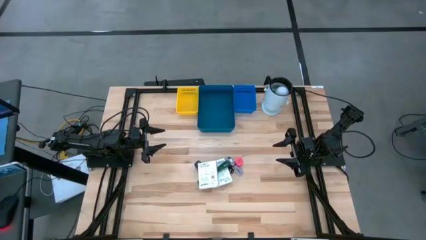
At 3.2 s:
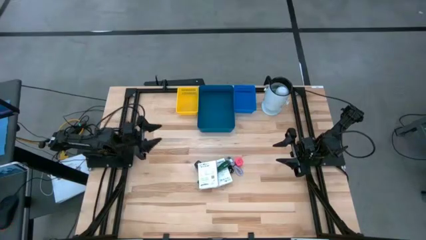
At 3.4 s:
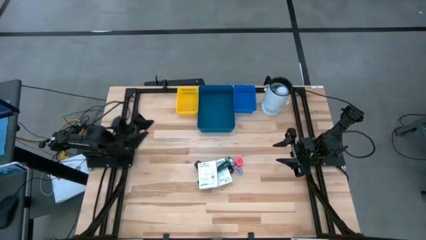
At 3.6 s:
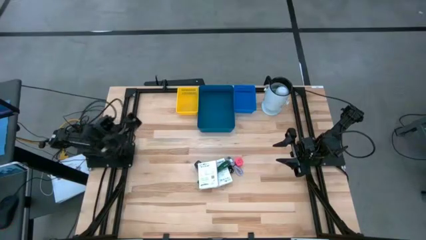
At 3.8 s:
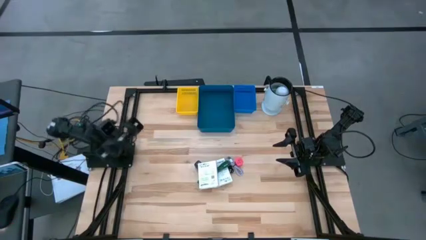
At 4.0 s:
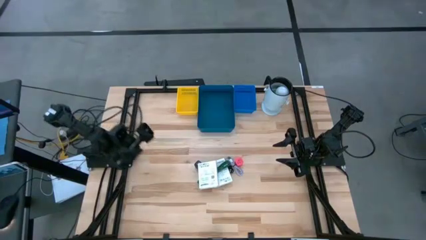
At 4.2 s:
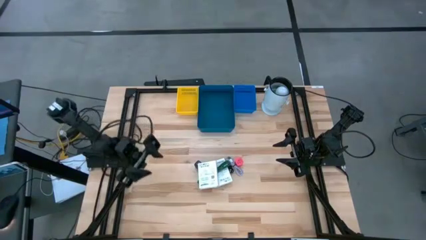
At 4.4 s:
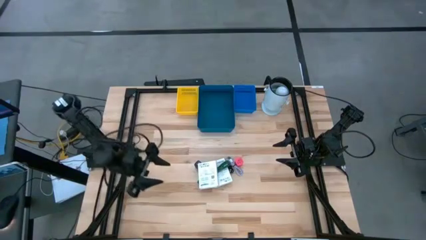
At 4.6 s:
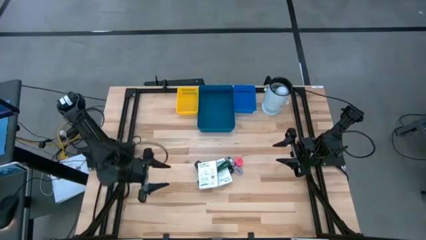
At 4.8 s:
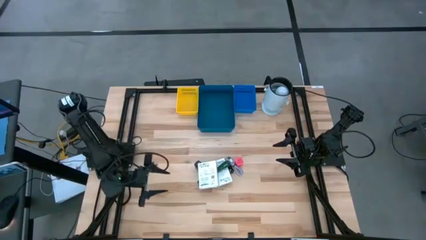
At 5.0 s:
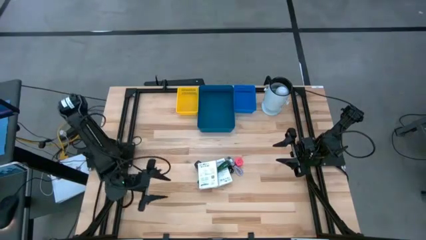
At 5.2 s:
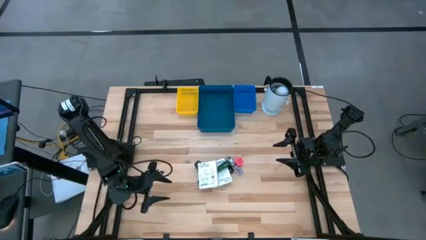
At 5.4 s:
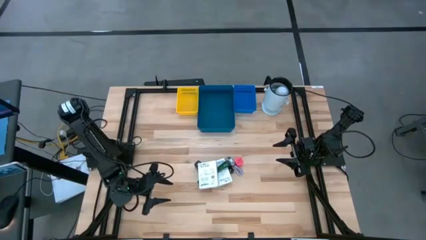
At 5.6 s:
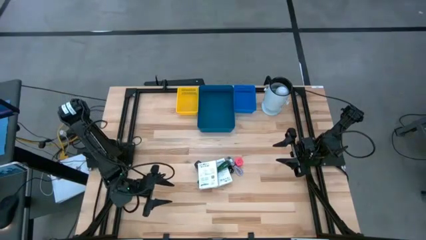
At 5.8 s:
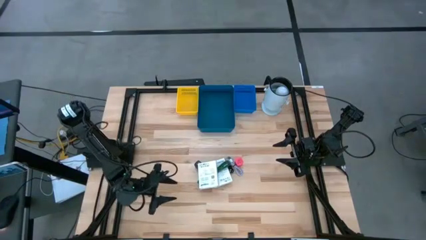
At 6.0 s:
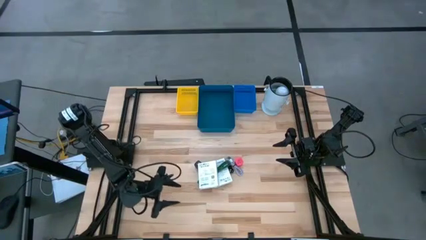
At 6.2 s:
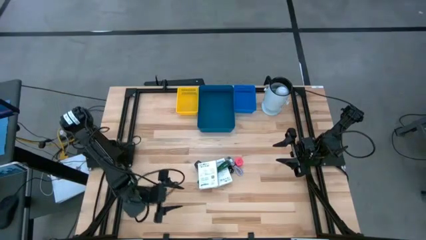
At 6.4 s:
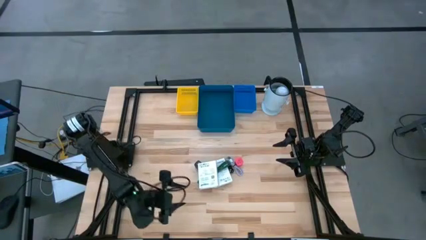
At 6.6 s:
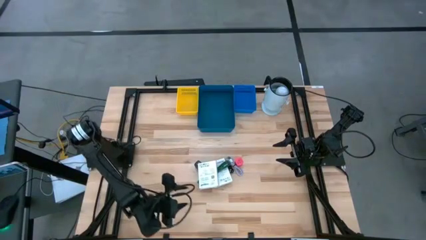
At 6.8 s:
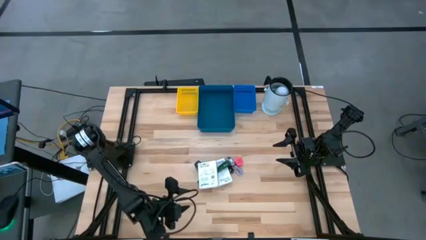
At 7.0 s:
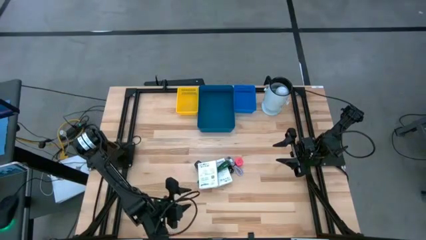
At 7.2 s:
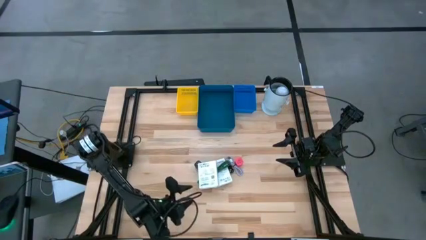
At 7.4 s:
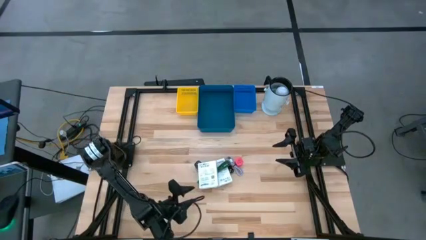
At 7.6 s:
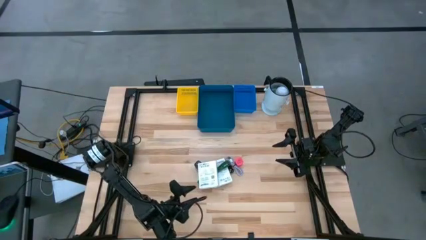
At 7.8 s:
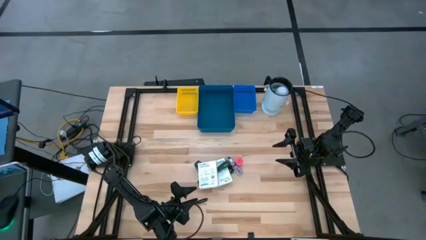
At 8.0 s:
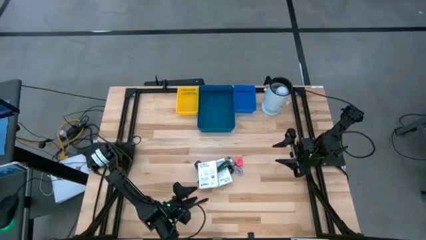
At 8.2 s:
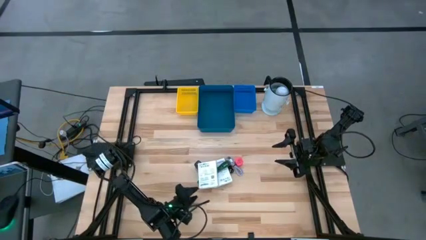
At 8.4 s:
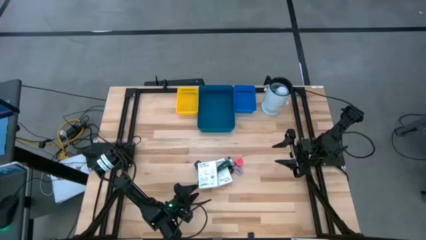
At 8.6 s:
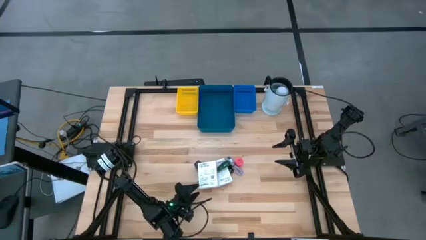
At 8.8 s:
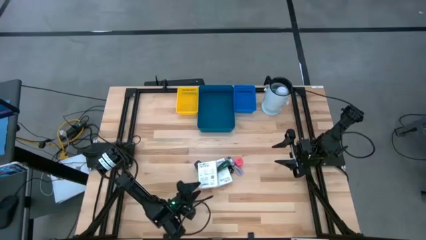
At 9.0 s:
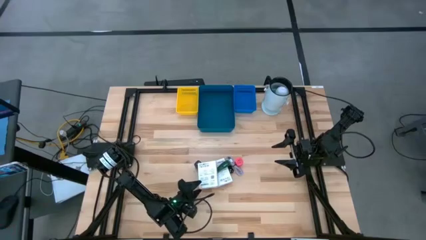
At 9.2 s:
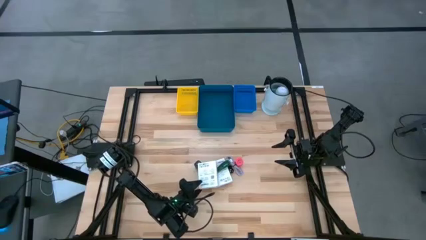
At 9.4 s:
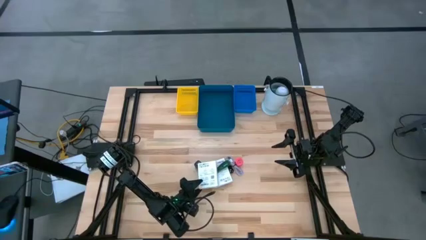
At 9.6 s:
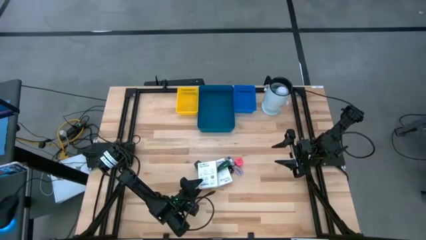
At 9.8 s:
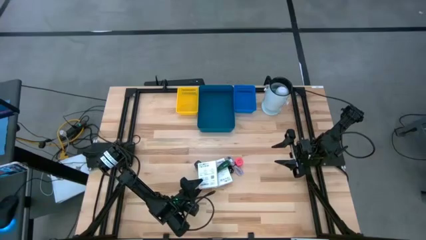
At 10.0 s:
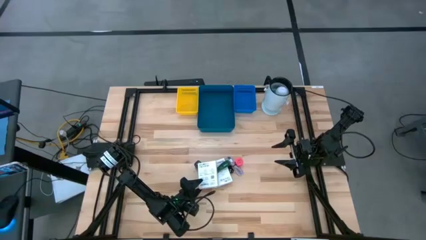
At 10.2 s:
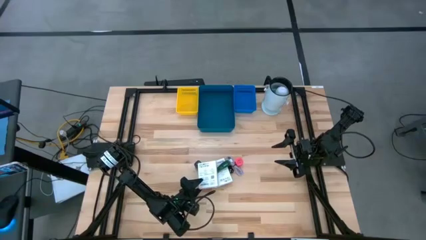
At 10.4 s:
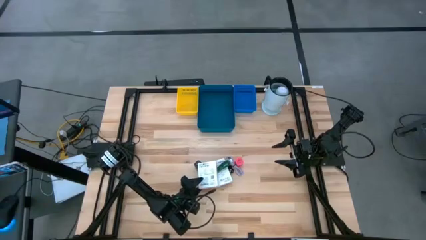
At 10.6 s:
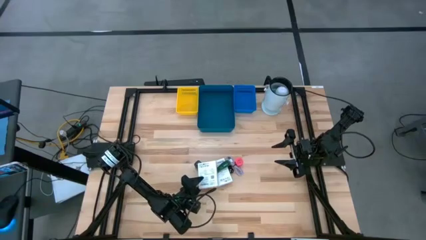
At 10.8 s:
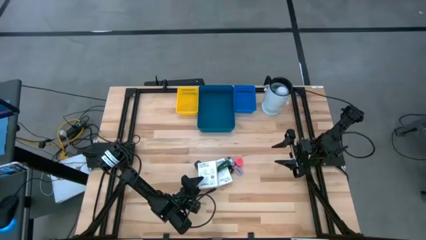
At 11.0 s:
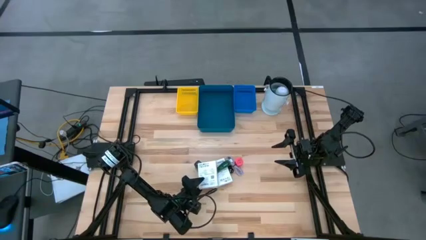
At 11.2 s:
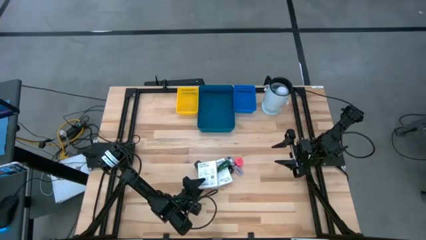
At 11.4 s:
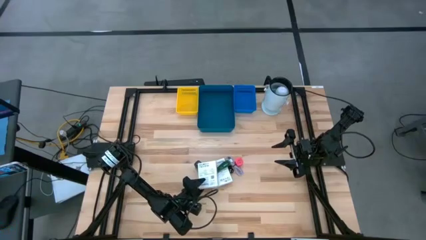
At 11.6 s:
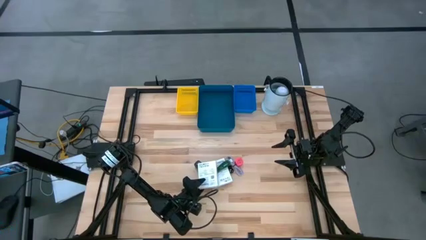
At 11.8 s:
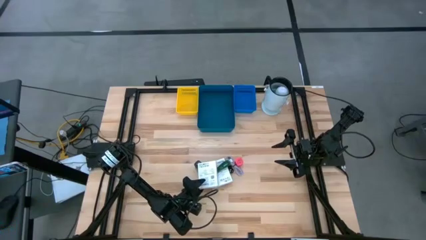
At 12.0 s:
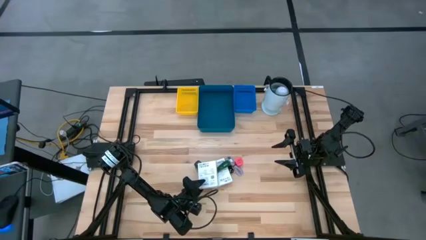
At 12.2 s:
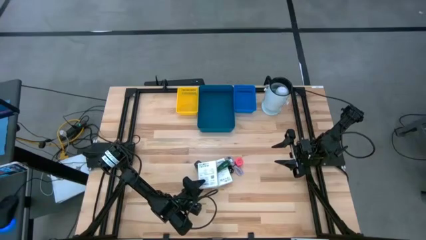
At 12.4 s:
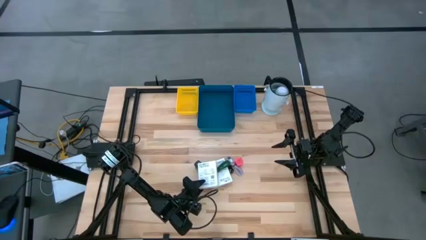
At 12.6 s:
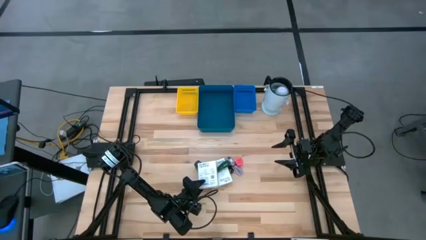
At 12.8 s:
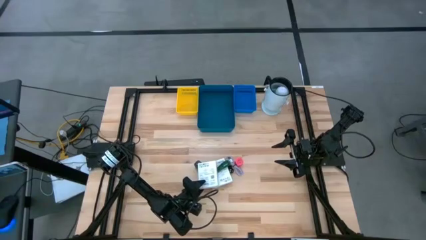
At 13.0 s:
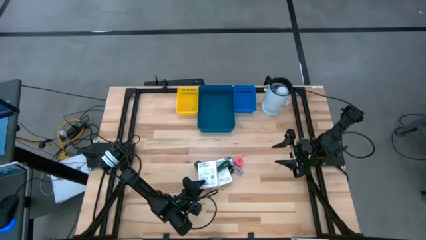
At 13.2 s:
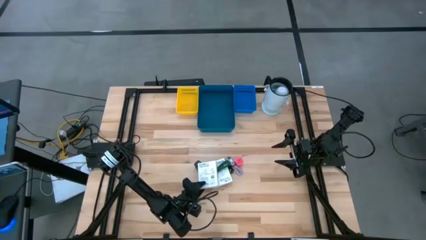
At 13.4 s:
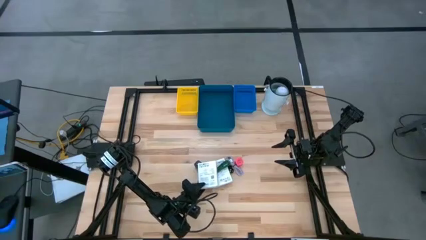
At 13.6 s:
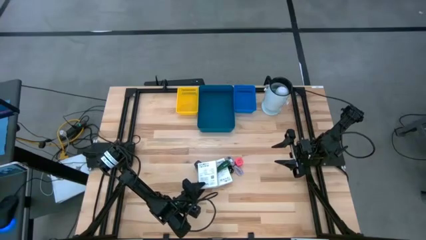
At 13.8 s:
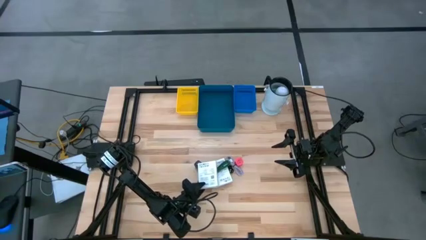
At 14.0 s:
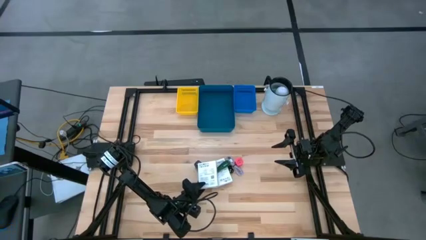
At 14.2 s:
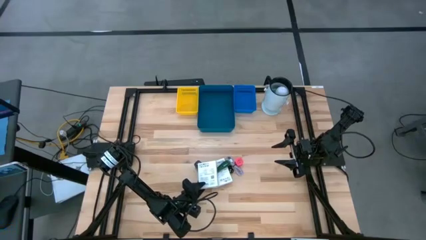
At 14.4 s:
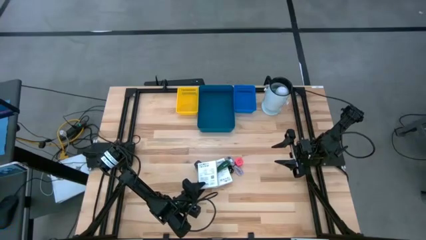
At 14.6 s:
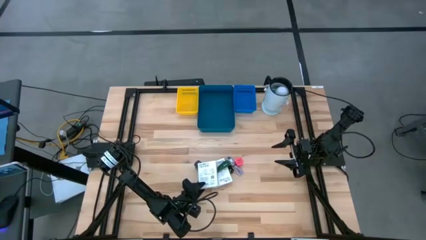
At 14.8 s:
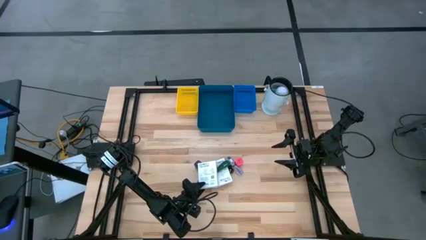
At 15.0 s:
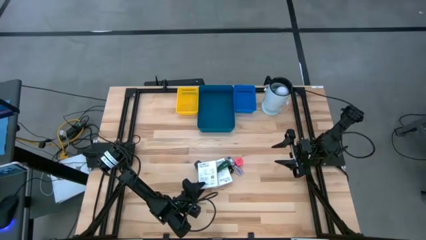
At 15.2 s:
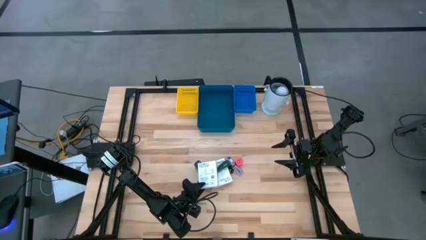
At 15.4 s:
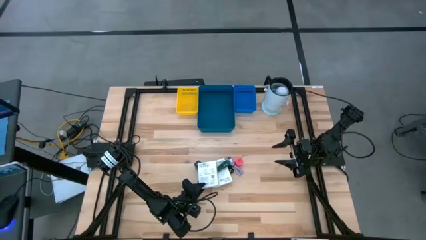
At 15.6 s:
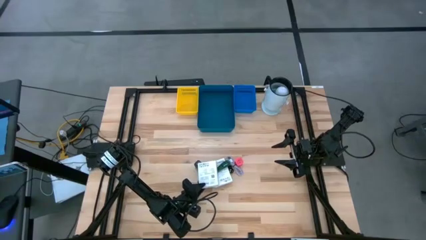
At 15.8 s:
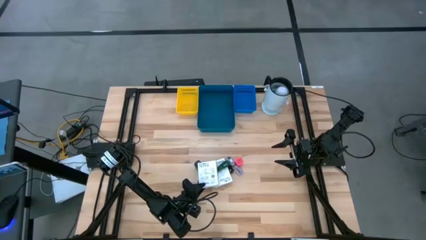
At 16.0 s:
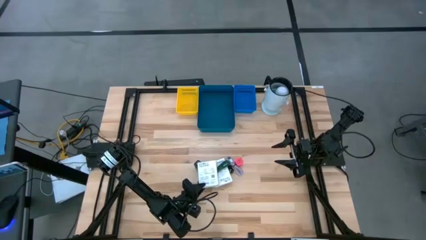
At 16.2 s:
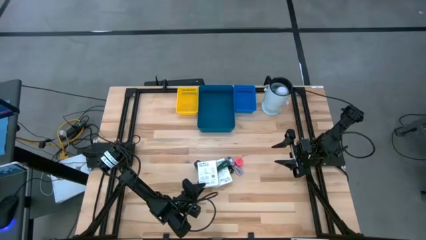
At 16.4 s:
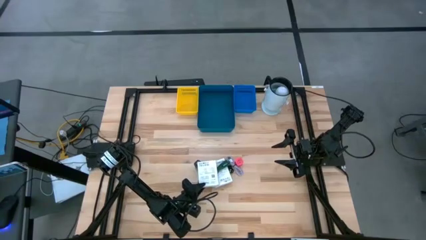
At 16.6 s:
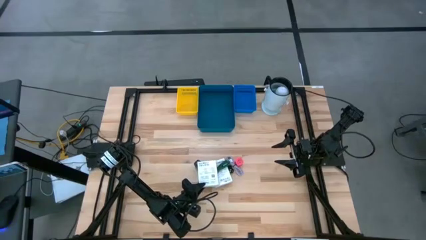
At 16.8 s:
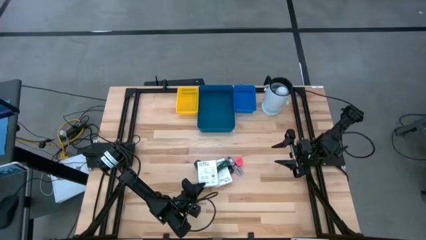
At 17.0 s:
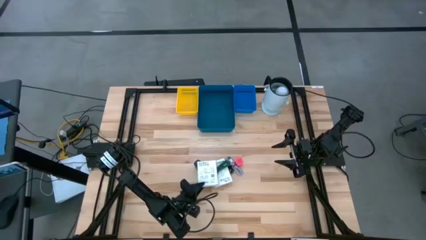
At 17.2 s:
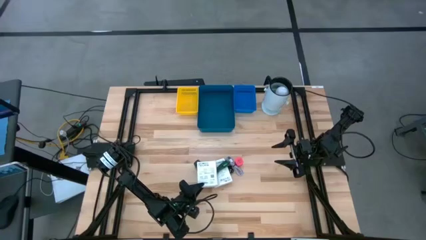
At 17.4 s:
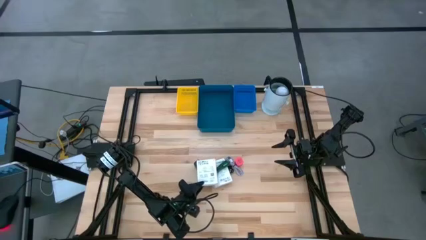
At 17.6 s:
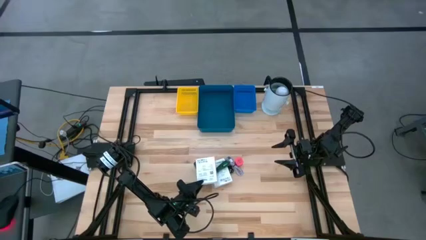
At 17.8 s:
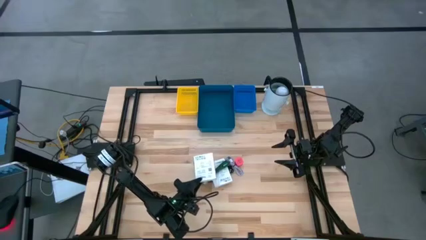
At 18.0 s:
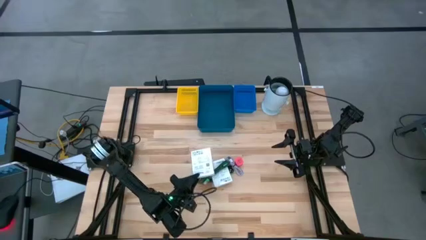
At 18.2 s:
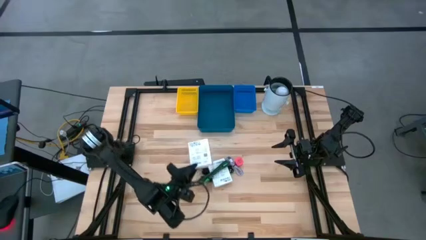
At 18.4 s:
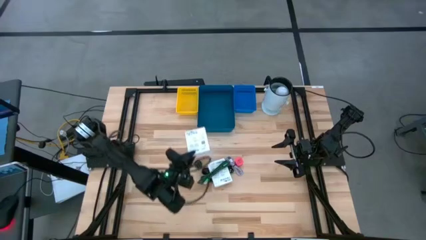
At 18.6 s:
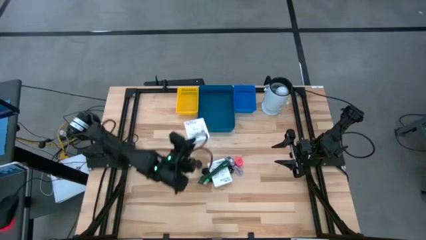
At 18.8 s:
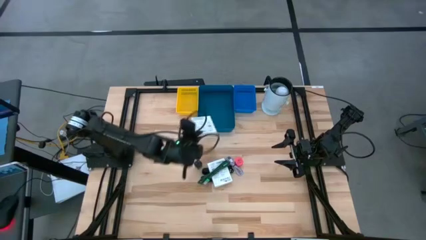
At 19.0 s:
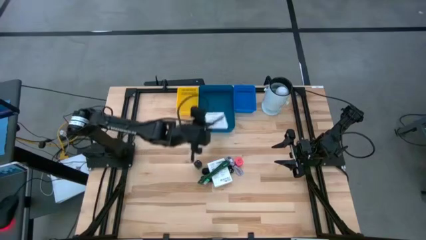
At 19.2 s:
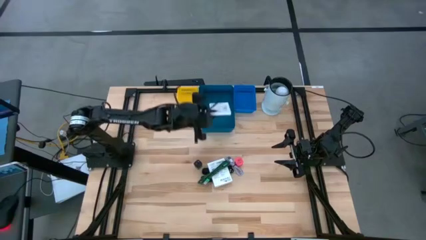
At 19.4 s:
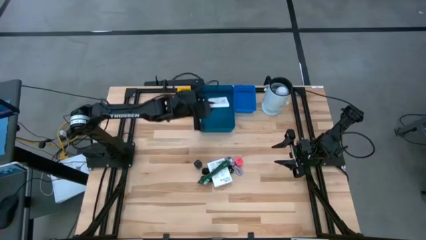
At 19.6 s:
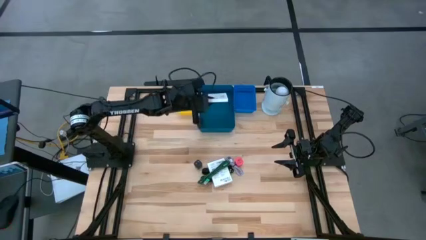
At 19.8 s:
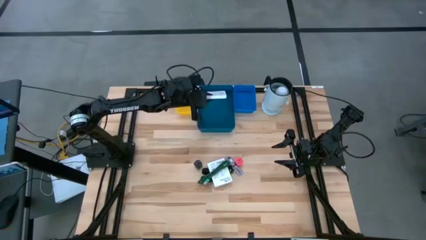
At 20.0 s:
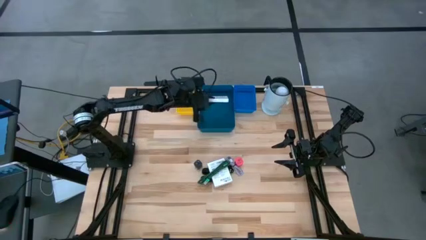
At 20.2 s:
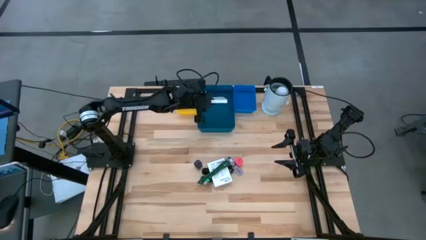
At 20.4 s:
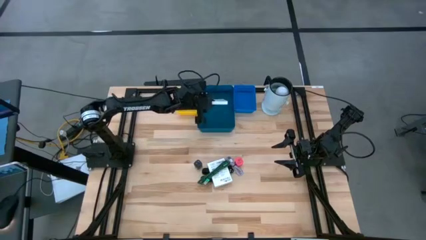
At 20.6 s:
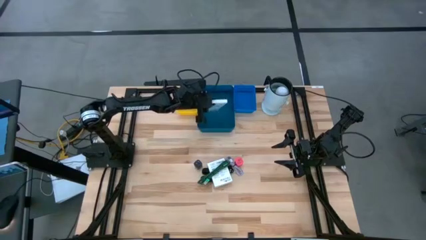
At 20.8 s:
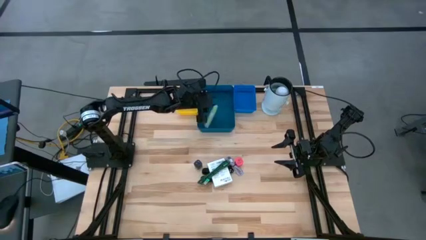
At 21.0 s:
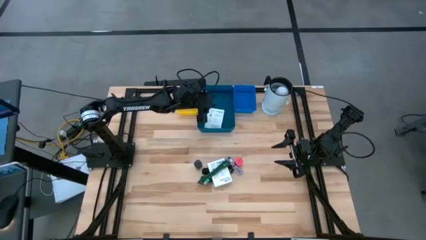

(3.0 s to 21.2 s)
Task: Pick and place items into bin
Put the left white box into the dark blue bin
